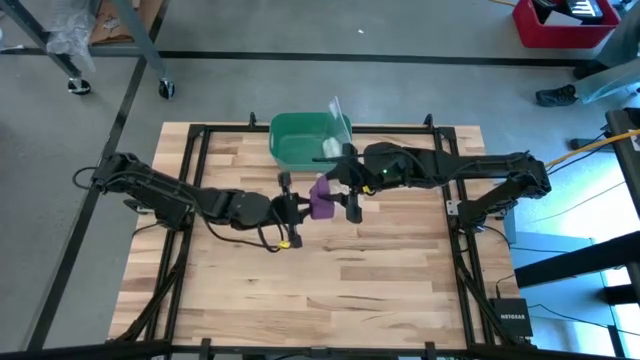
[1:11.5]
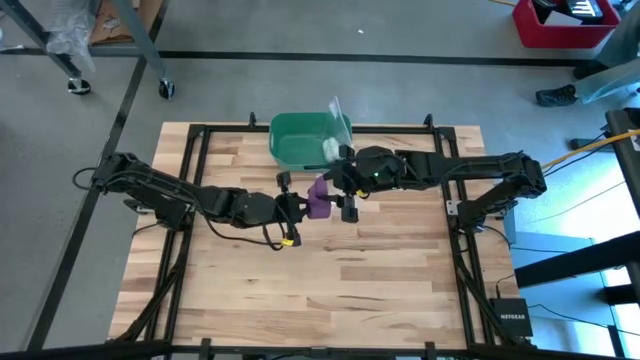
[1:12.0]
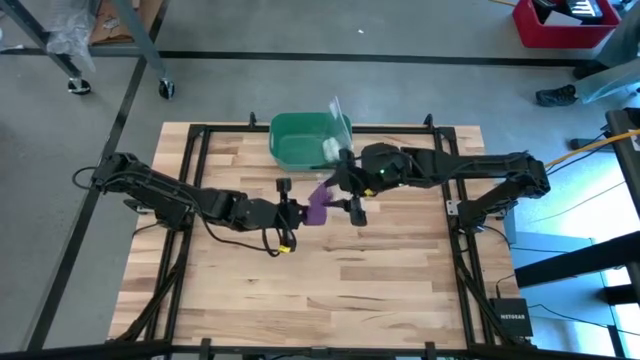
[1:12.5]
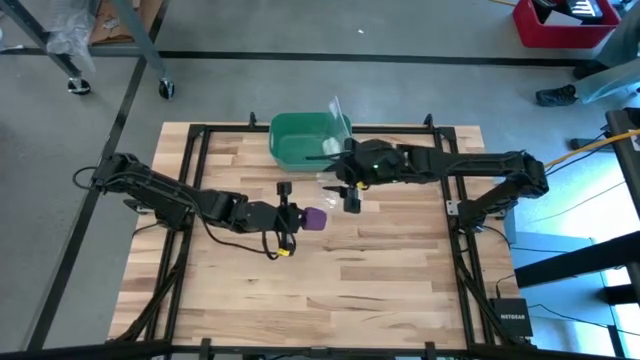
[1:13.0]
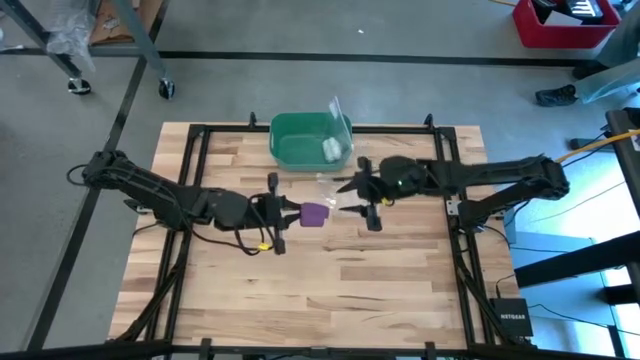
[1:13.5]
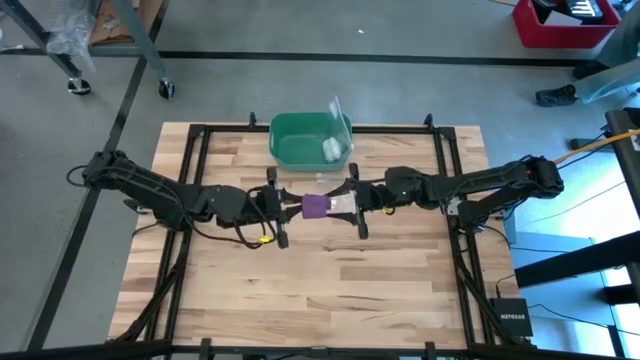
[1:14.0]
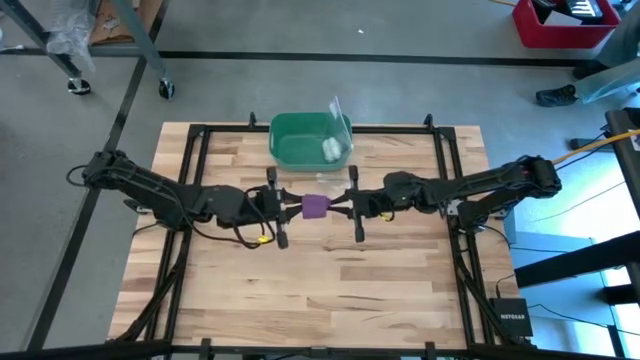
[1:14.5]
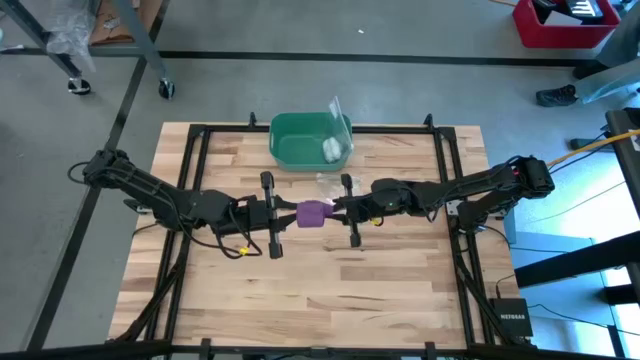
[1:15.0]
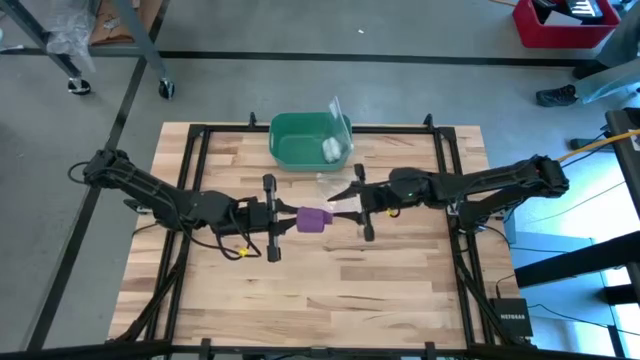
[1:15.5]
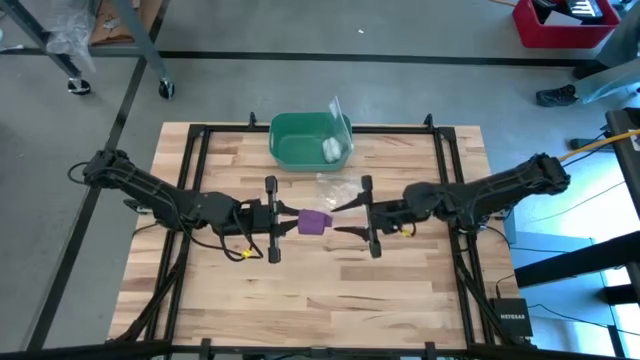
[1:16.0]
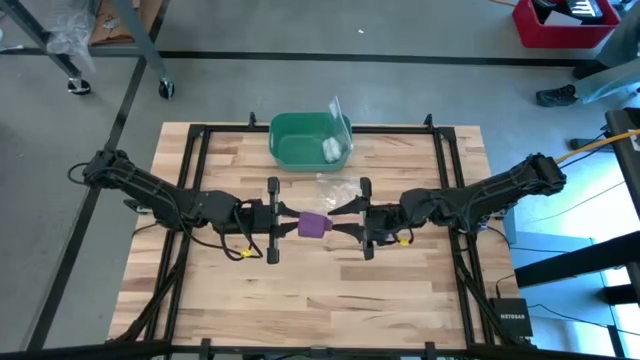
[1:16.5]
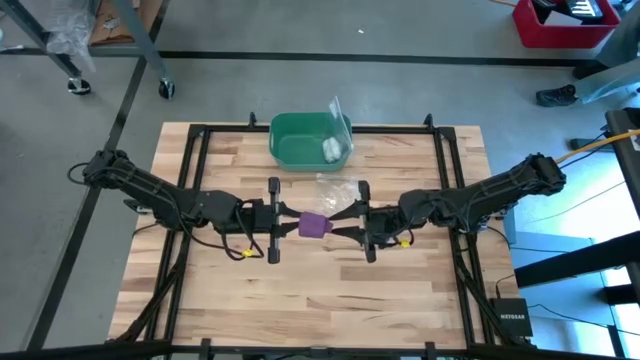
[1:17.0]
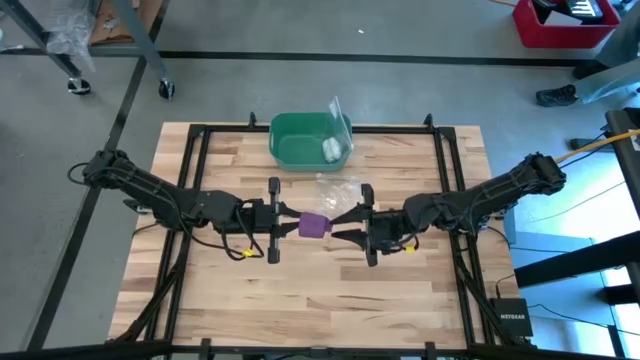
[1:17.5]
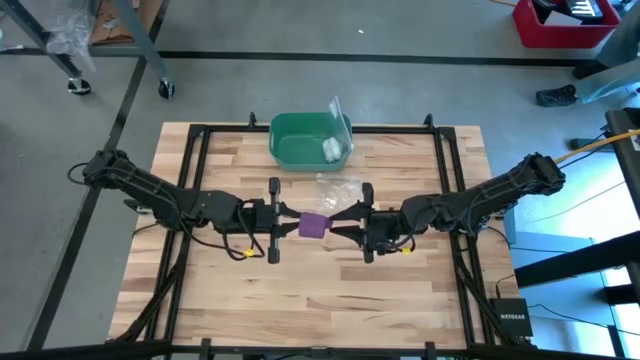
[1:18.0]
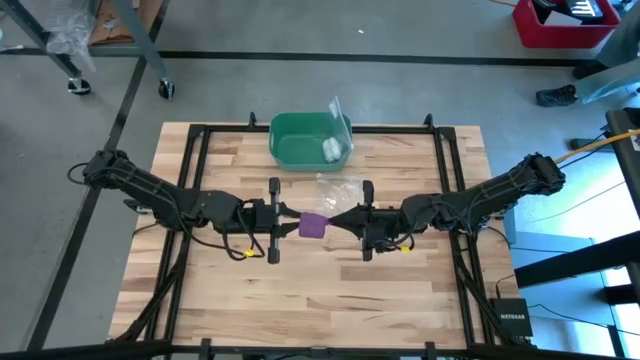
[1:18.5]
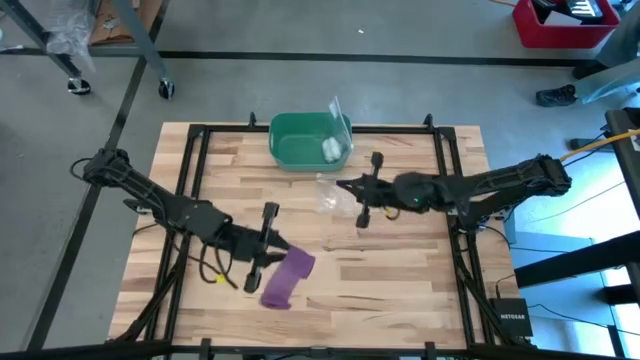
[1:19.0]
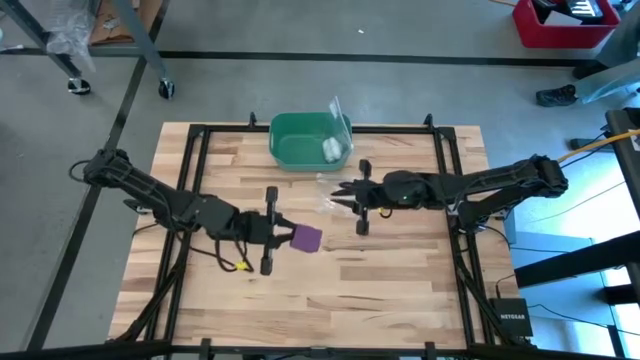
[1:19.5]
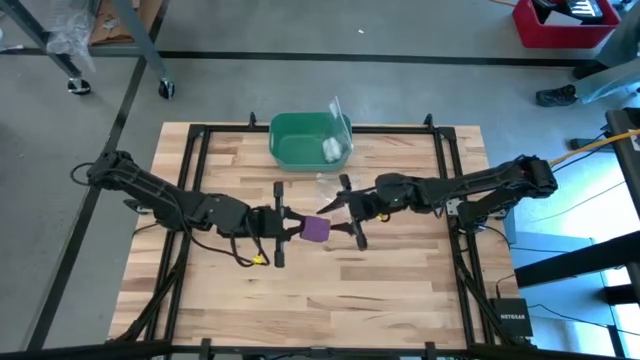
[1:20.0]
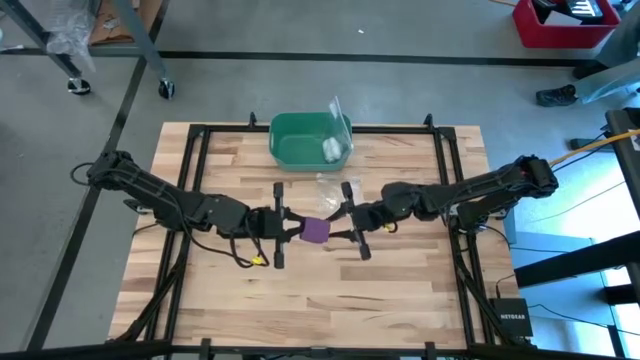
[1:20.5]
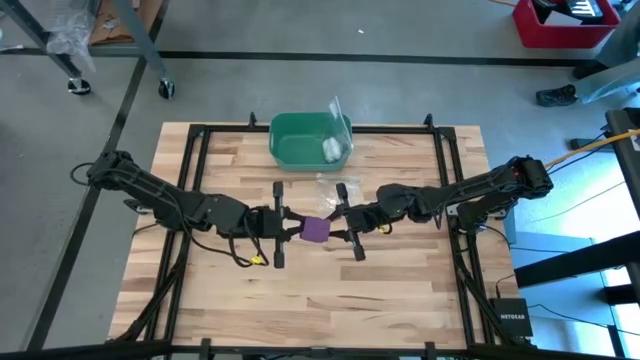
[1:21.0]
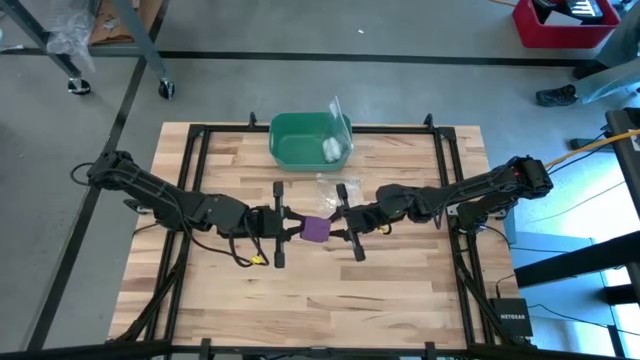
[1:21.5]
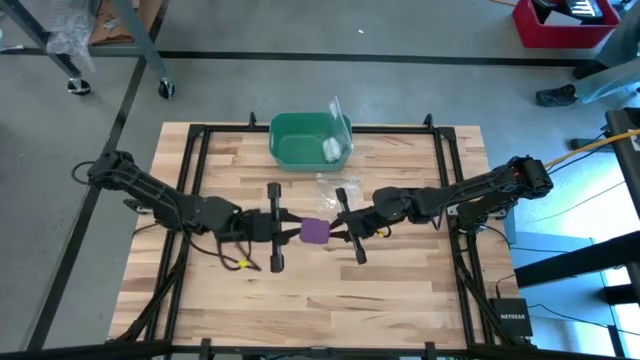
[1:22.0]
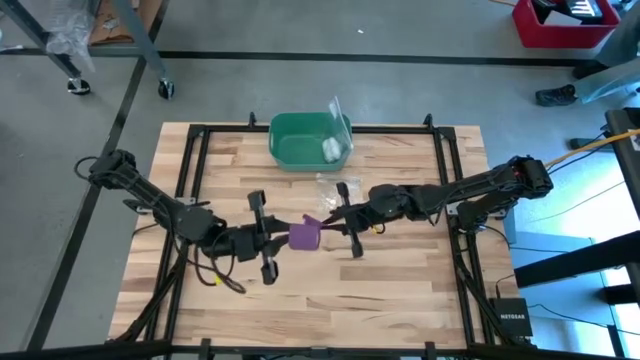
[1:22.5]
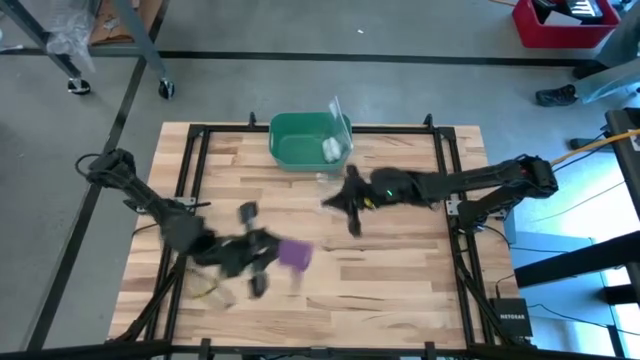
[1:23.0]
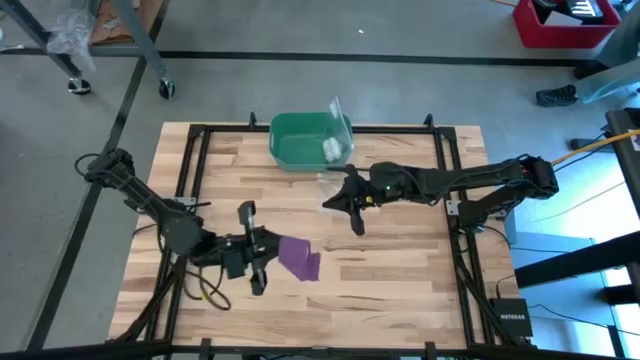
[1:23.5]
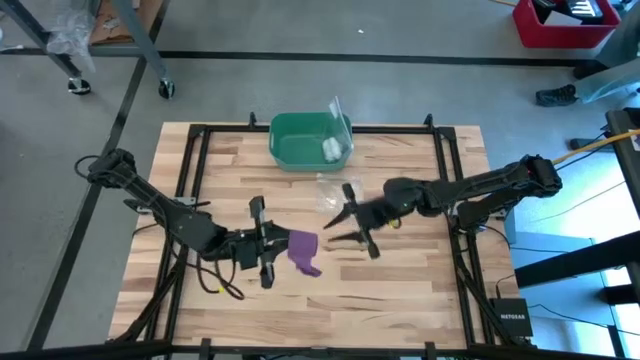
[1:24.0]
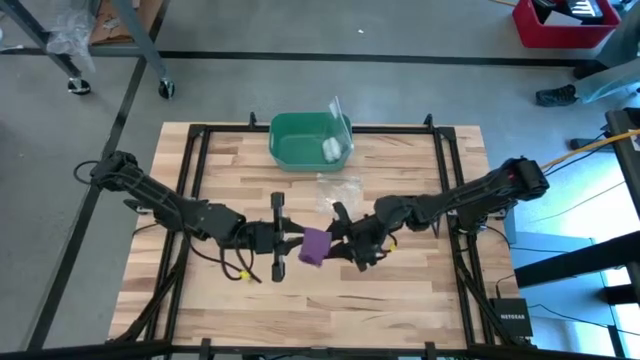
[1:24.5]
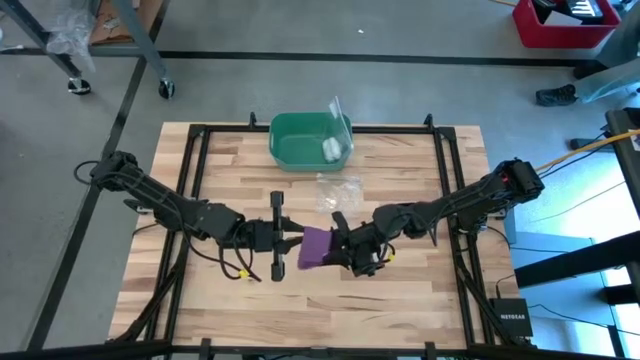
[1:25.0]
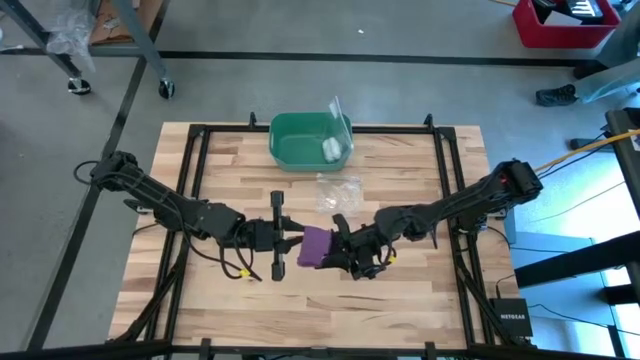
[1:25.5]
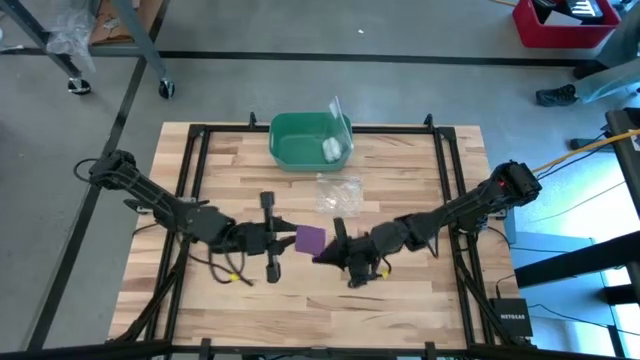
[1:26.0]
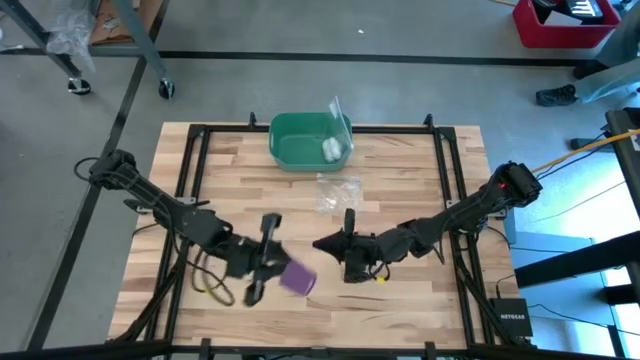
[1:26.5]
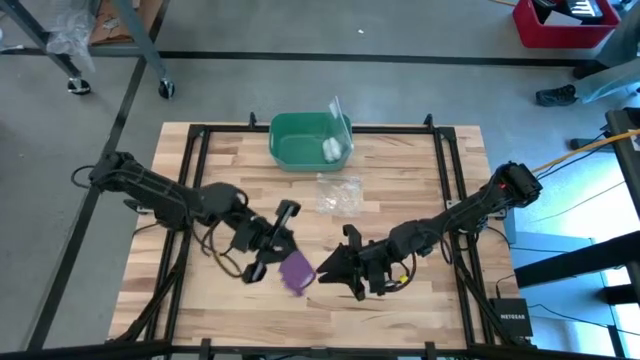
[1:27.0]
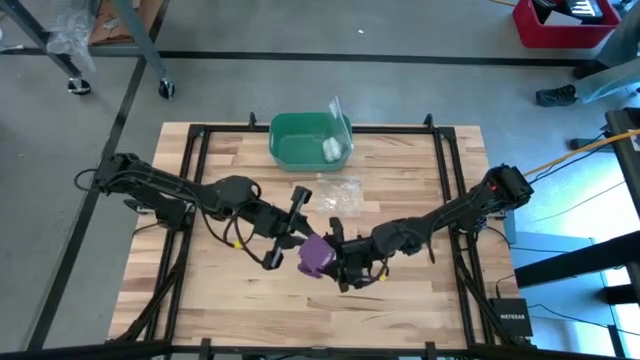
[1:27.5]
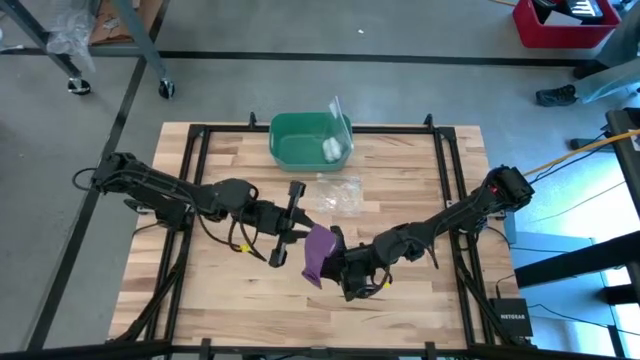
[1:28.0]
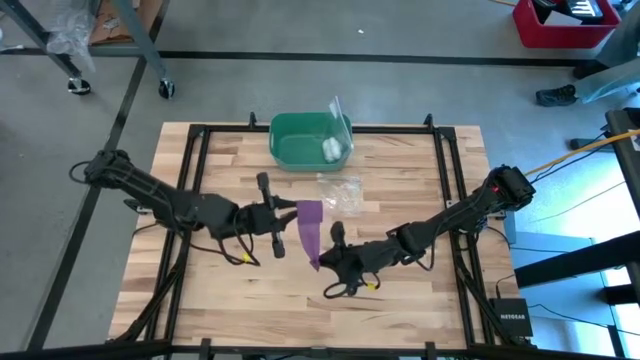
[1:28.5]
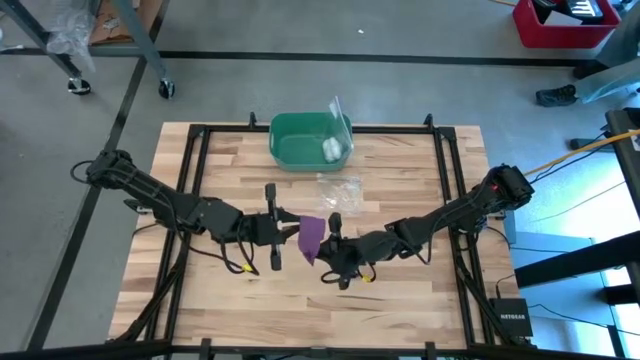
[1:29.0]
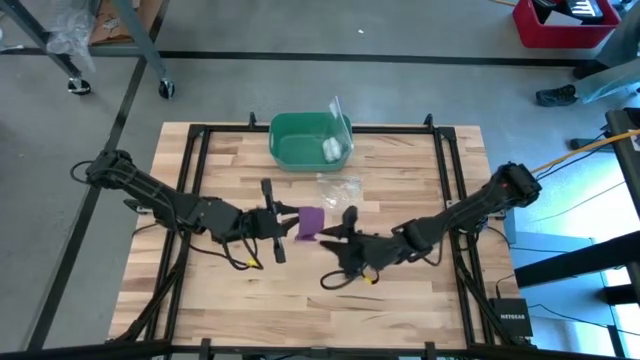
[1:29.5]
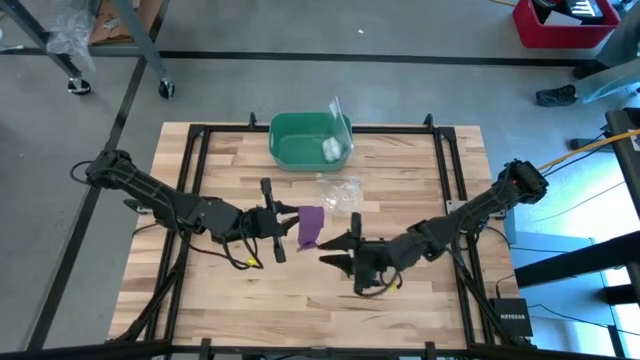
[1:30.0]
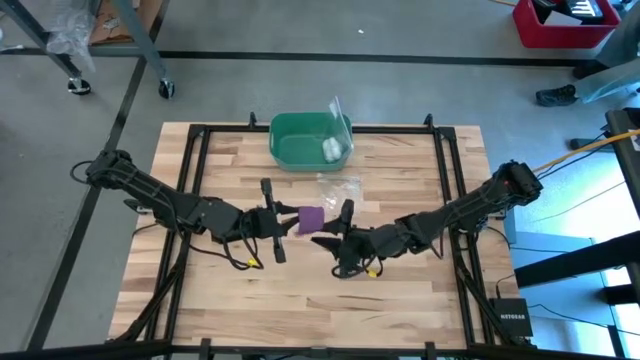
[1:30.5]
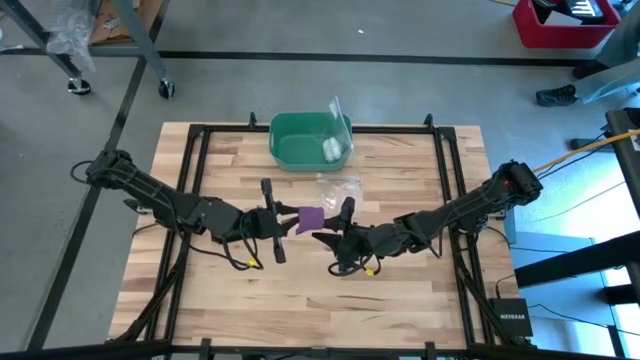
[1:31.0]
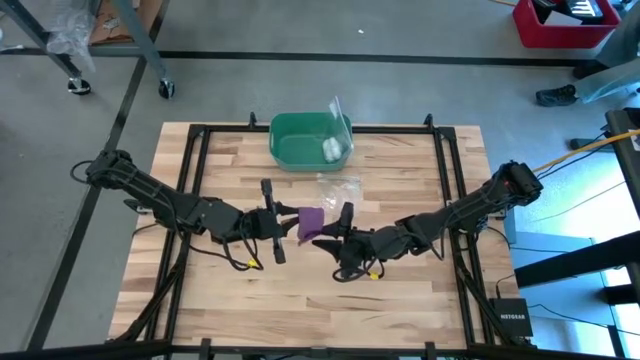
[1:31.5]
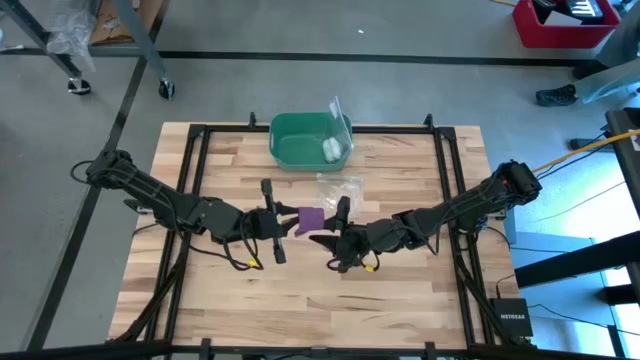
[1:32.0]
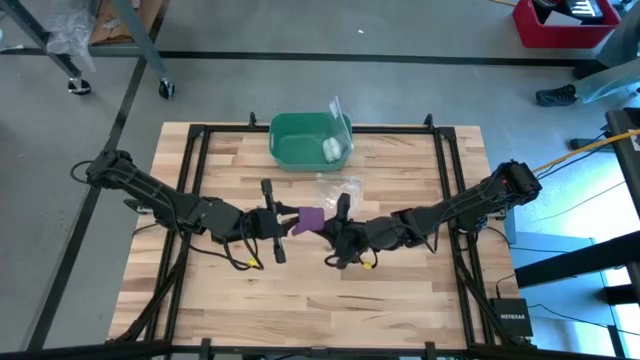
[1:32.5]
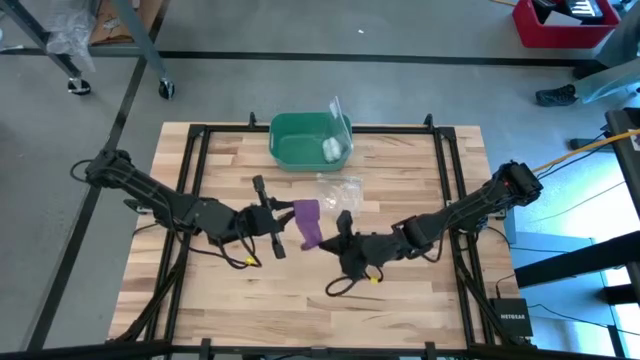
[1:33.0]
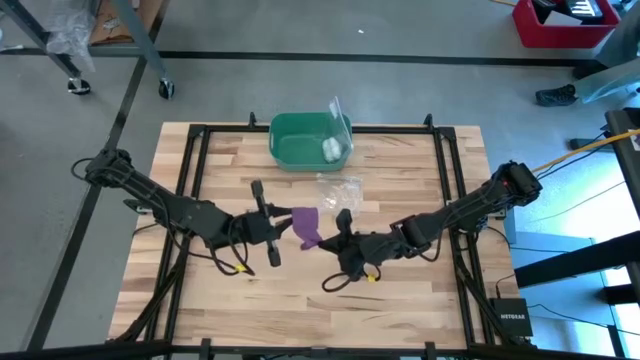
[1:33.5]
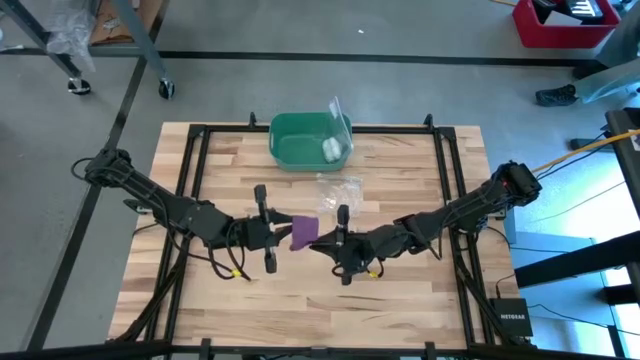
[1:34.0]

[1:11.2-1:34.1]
Task: Roll bandage
Roll the violet bandage
